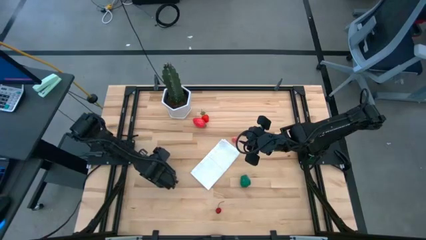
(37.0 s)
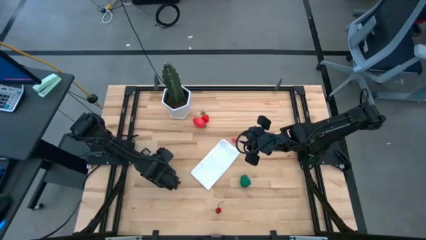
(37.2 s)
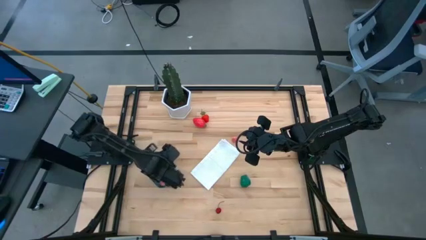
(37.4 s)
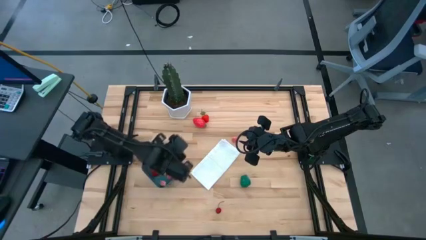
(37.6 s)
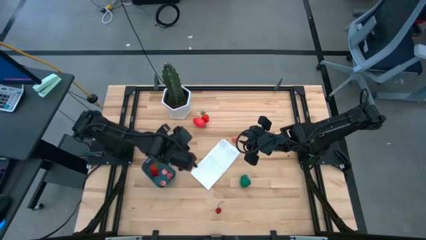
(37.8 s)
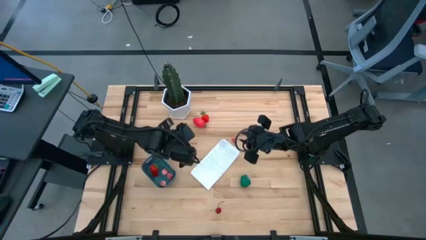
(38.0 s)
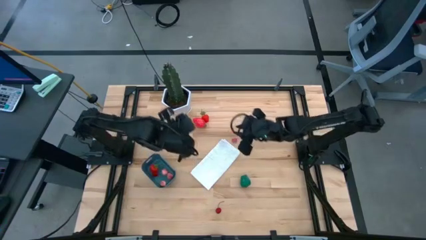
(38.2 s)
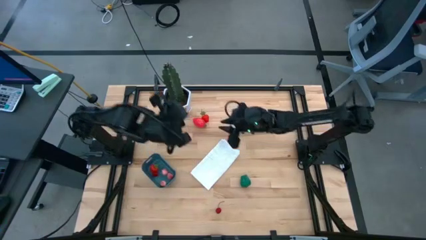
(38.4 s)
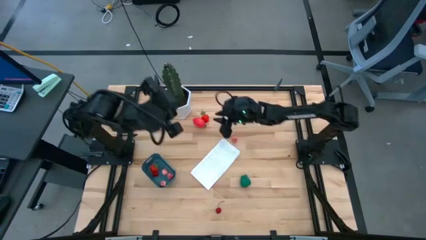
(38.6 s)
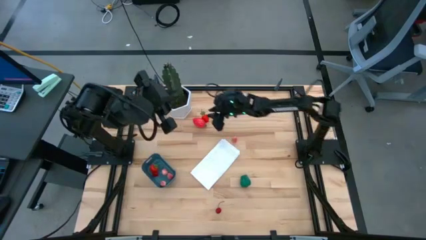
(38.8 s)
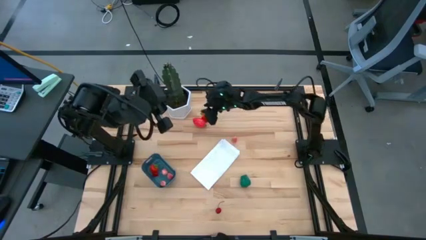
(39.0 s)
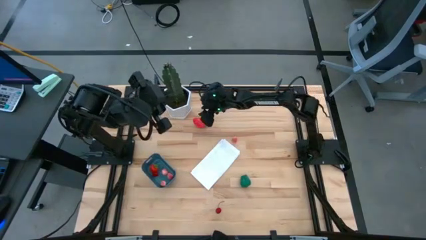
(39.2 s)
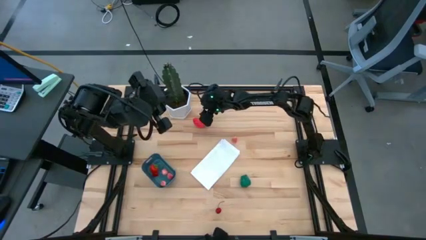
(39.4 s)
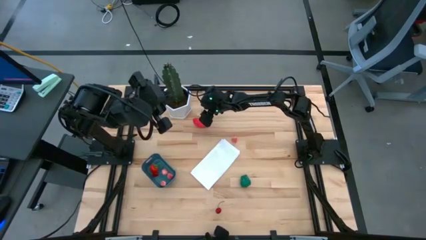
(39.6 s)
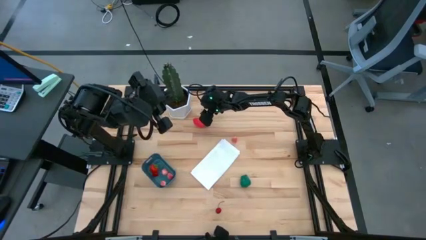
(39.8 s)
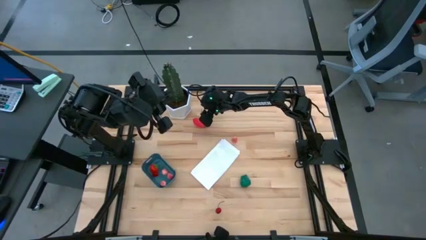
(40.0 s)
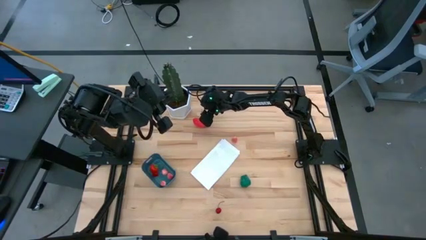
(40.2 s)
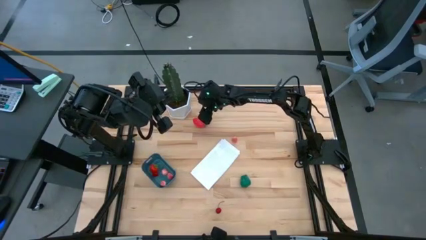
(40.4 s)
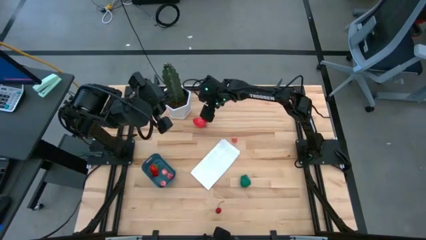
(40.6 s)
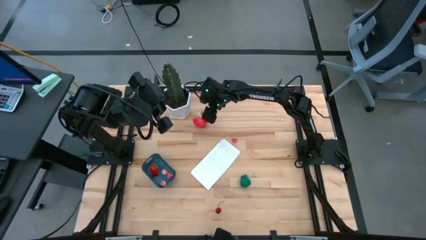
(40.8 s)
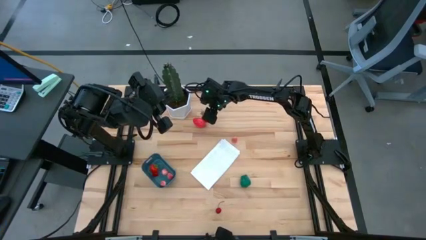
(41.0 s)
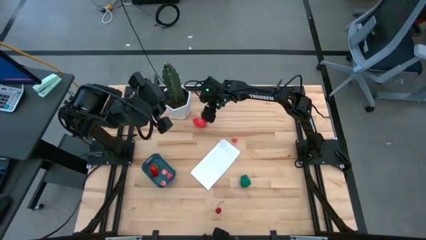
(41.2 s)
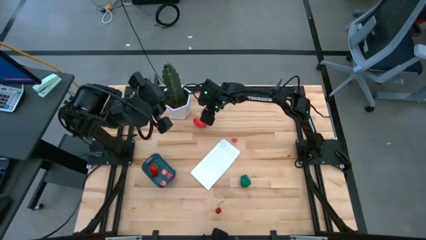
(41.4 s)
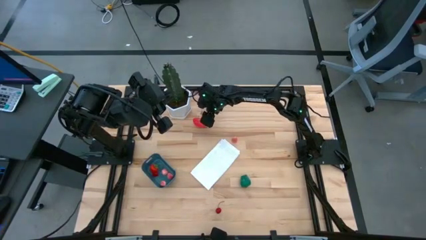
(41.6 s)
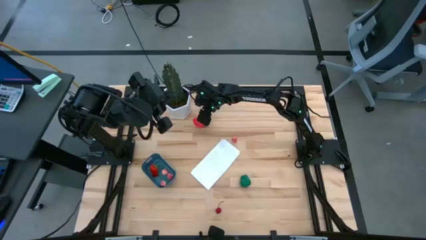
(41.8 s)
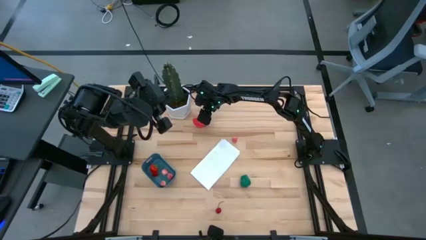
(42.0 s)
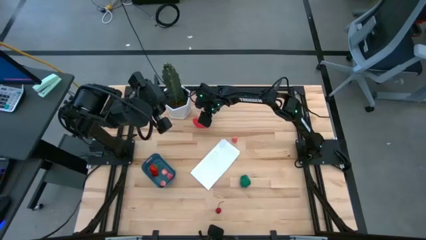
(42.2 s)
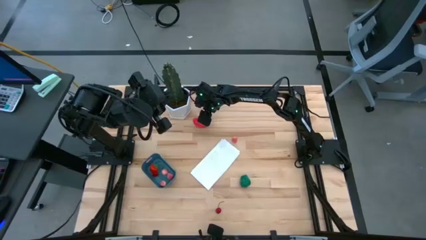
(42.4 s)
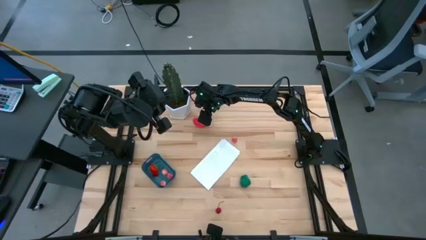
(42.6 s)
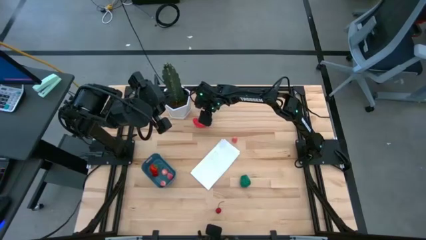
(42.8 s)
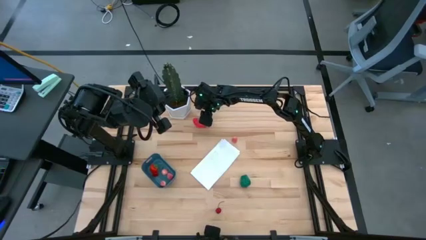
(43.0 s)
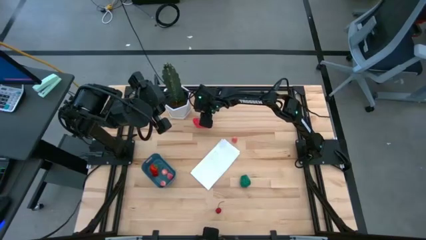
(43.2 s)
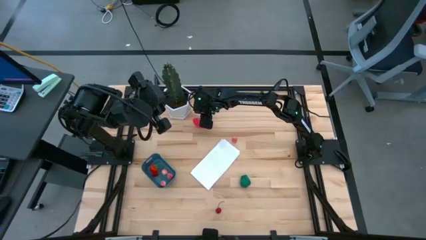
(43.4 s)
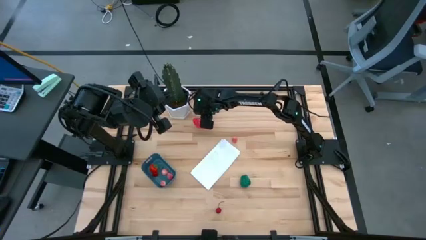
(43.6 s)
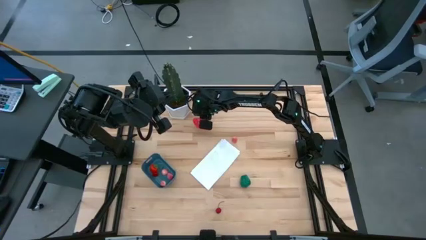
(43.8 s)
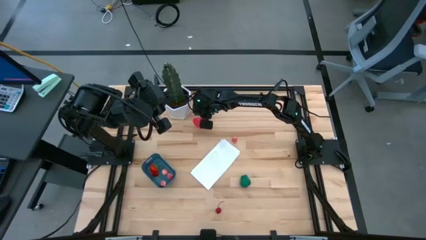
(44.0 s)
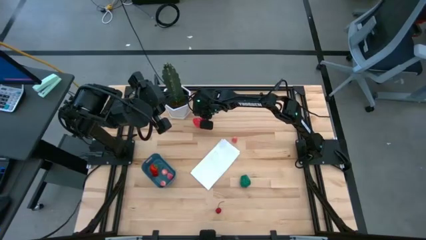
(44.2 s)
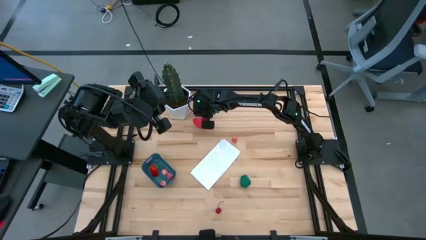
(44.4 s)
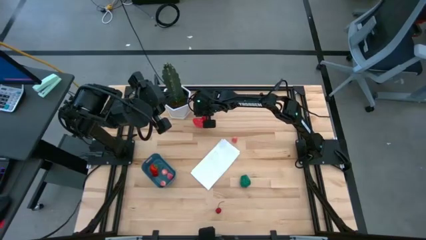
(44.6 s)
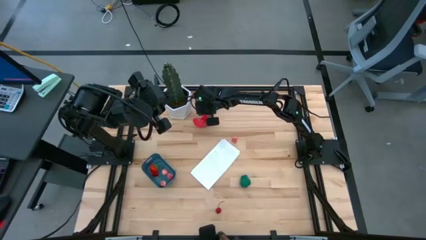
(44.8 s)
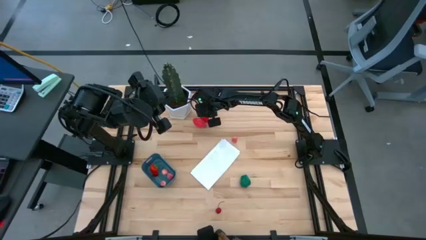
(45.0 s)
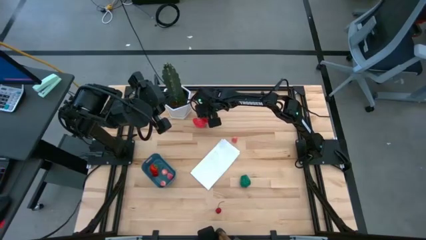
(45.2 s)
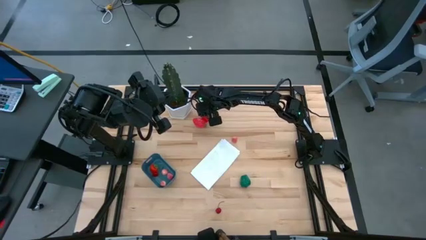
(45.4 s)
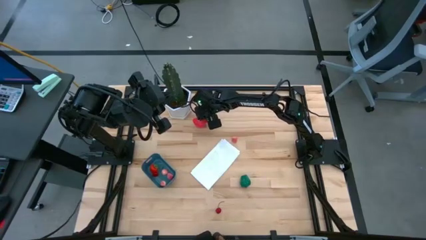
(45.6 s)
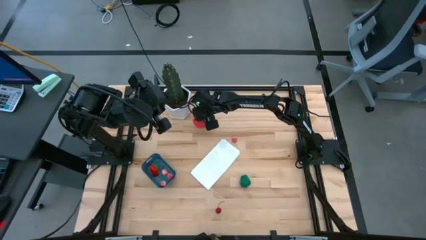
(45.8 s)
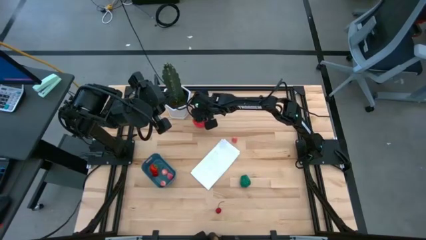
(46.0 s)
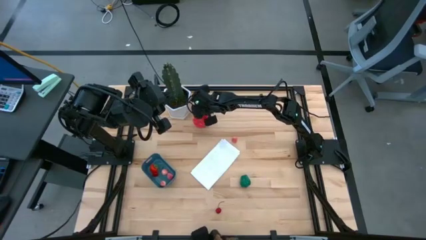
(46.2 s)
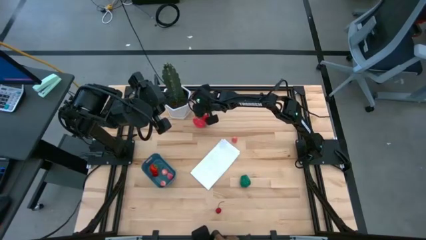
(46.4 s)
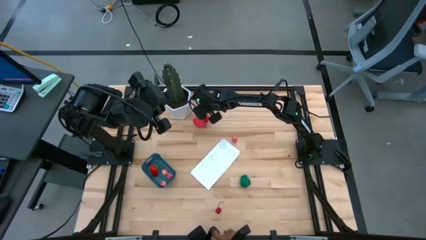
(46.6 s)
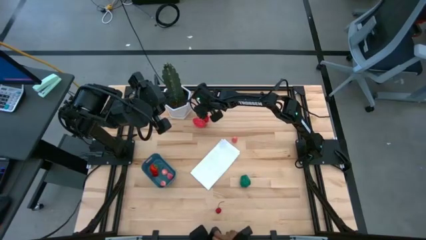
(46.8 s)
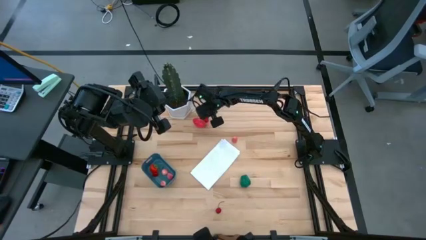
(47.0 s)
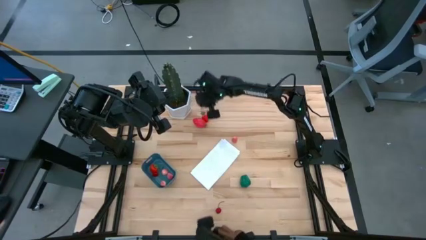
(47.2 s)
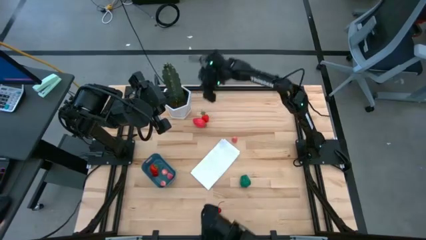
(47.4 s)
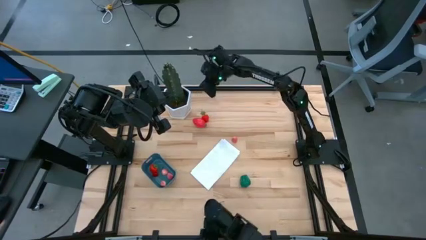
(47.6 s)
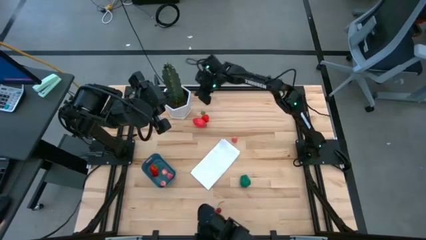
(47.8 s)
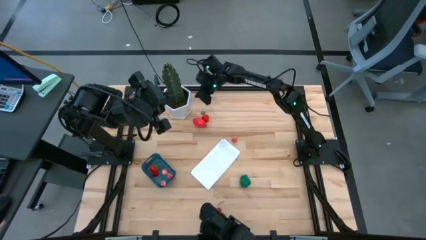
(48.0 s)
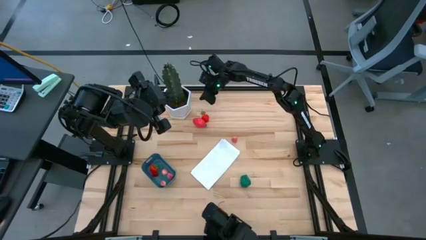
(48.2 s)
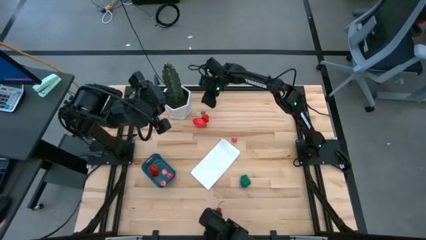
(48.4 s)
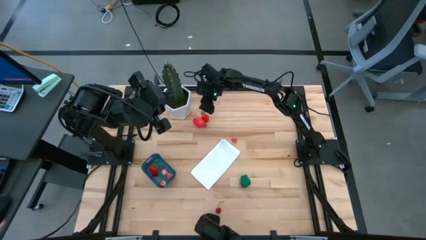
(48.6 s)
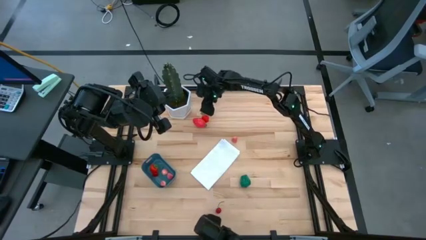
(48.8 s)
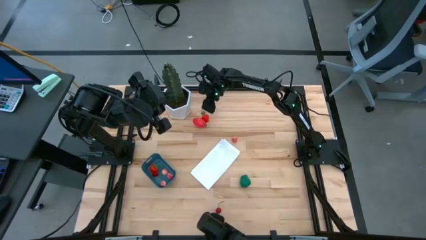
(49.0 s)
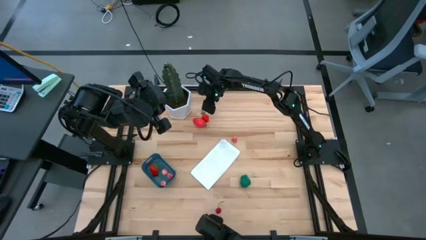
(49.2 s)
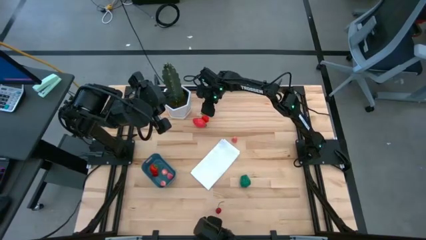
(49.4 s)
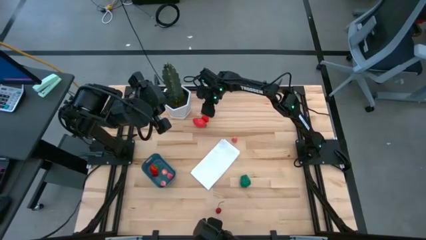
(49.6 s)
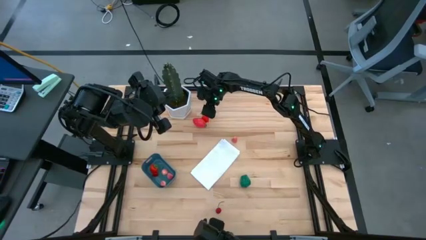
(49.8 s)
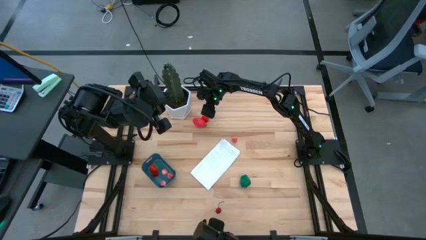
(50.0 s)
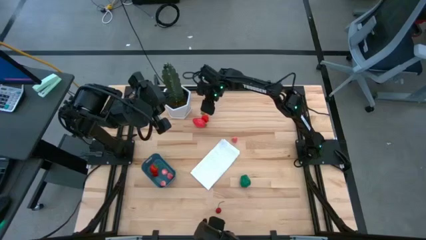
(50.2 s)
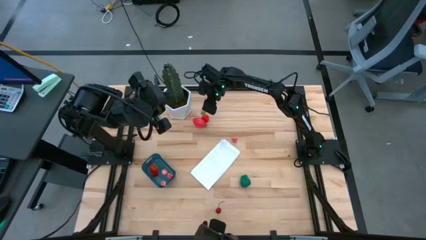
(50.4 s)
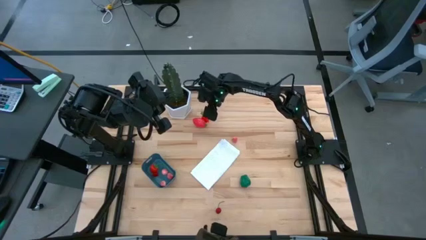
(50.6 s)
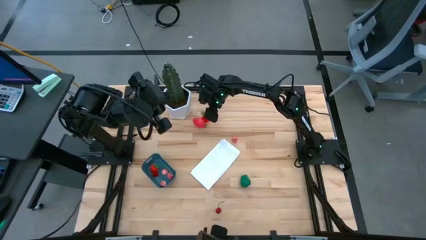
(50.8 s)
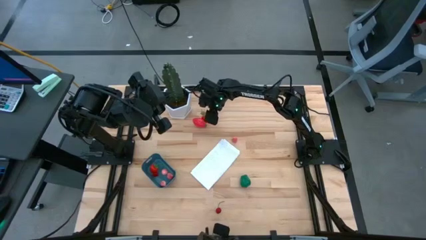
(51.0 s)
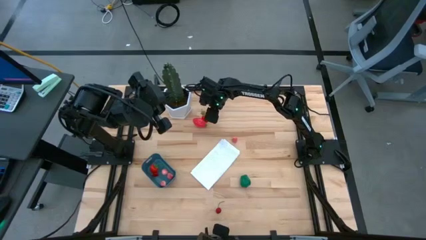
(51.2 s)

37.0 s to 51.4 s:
Task: Pick and placing Produce into tupperware
Put the strawberry into the blue bin

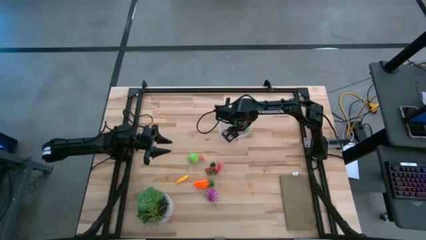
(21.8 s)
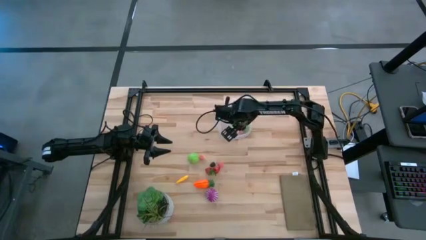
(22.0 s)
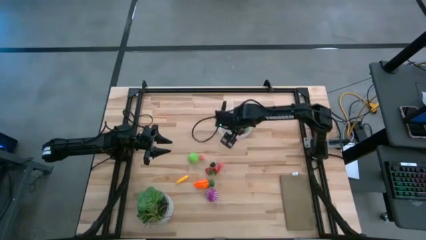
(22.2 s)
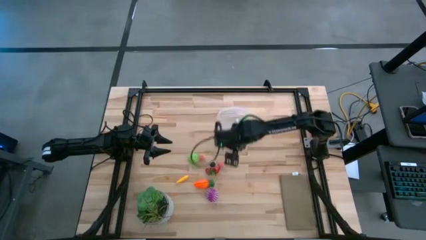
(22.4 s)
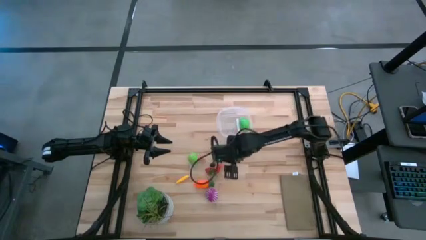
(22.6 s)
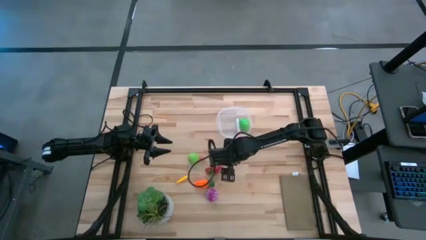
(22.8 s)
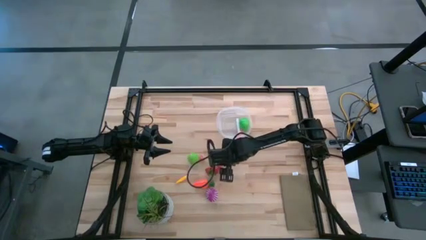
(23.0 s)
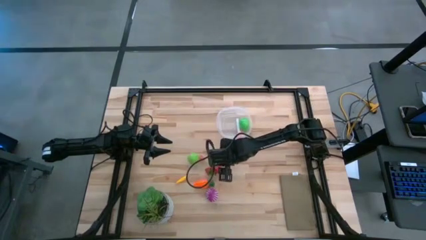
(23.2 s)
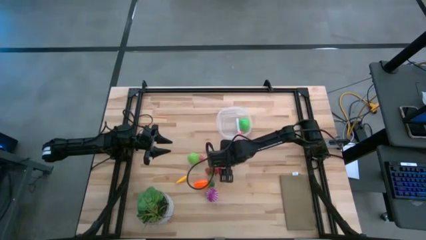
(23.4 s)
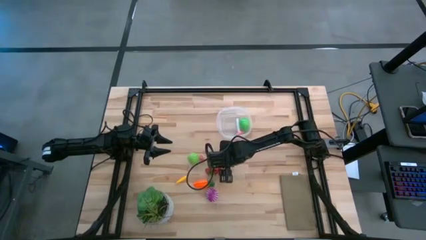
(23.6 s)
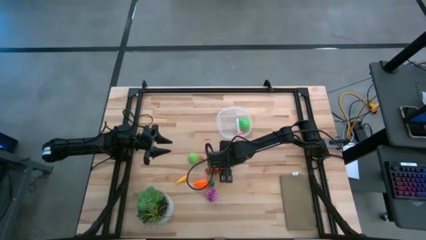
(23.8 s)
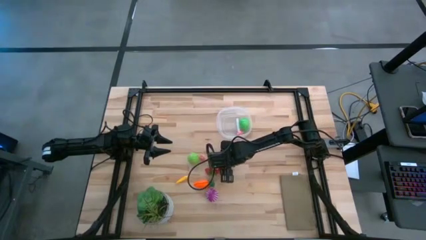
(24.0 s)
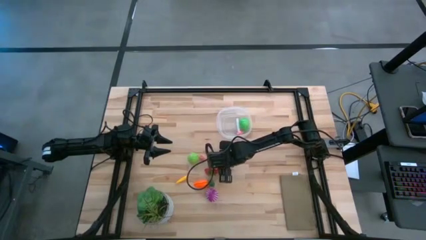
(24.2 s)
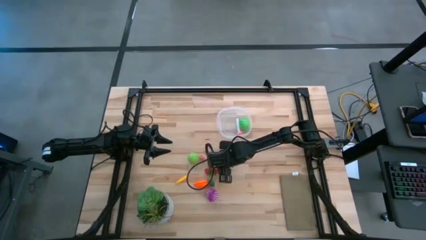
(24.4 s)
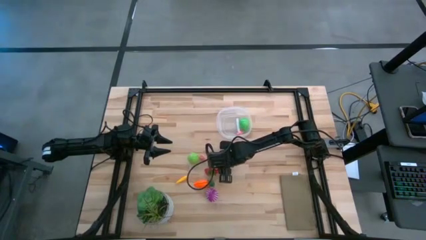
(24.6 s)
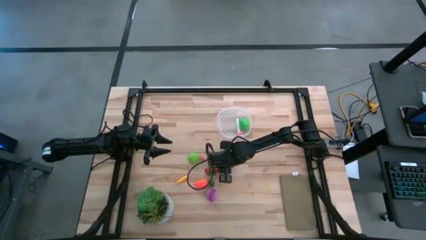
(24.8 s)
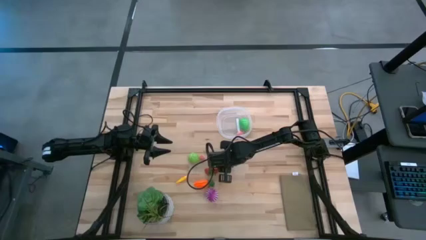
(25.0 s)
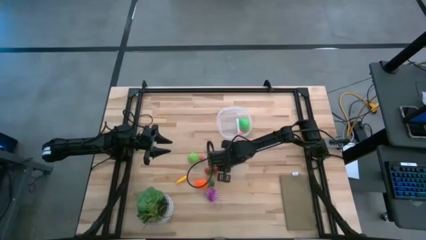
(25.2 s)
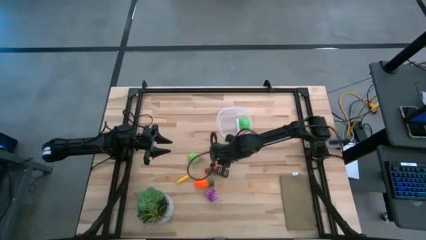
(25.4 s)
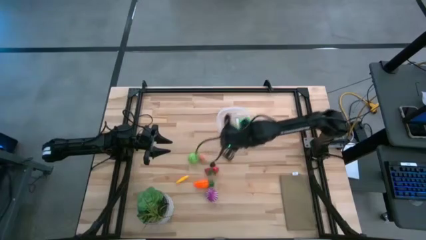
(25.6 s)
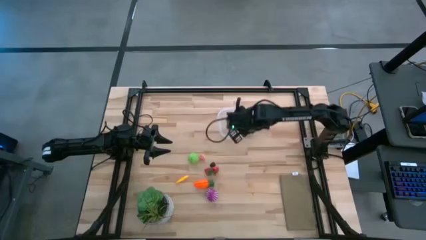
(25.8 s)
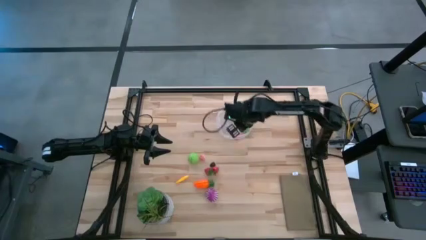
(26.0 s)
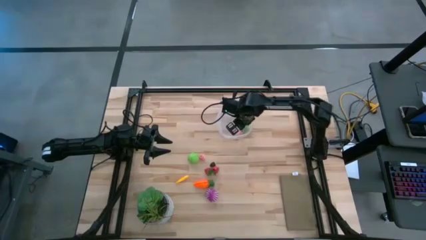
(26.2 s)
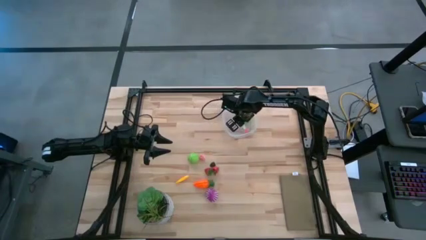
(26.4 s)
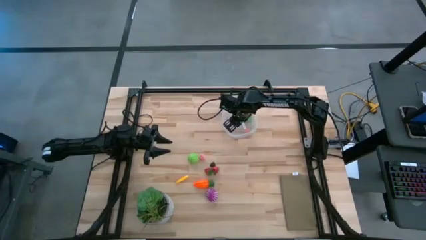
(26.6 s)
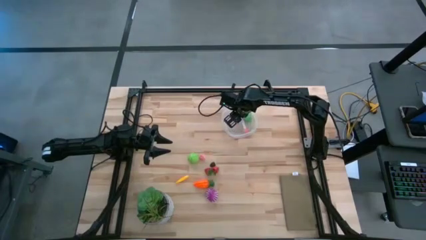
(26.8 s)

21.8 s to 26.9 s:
Task: Pick and placing Produce into tupperware
Put the bottom pink peach into the transparent bin
